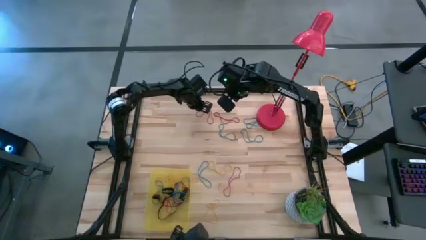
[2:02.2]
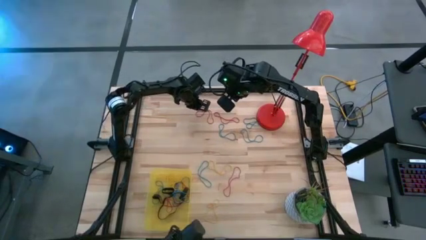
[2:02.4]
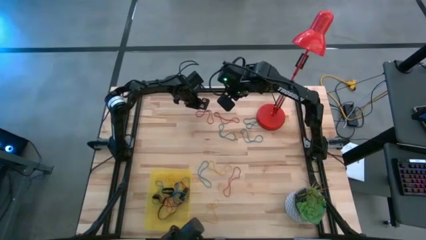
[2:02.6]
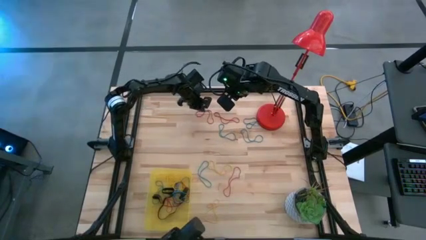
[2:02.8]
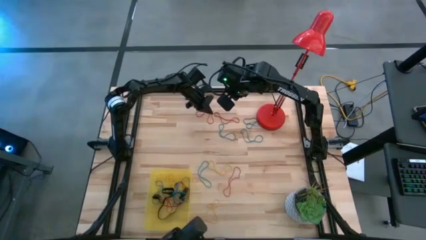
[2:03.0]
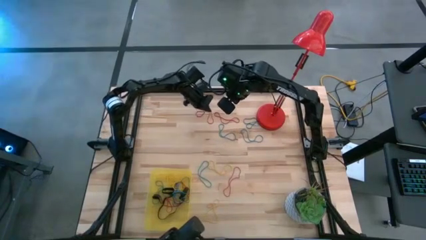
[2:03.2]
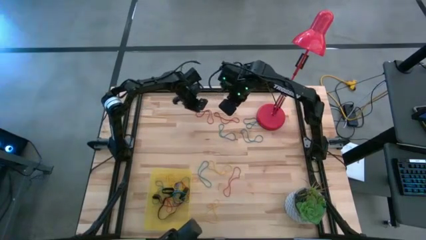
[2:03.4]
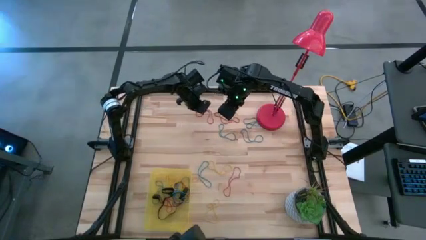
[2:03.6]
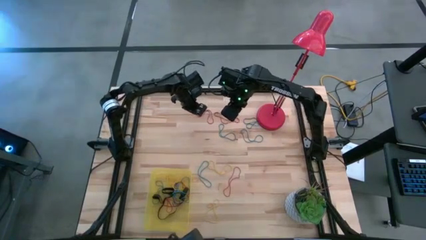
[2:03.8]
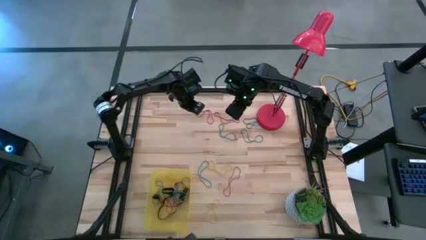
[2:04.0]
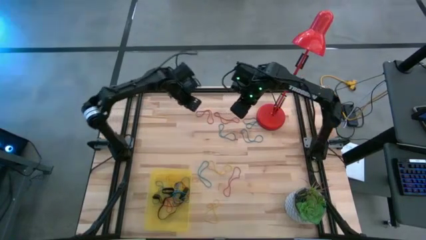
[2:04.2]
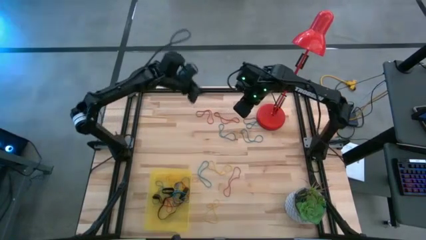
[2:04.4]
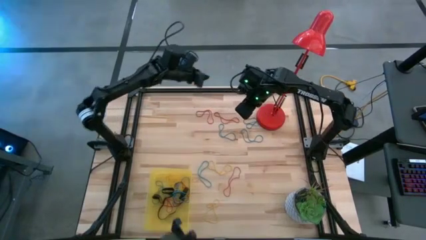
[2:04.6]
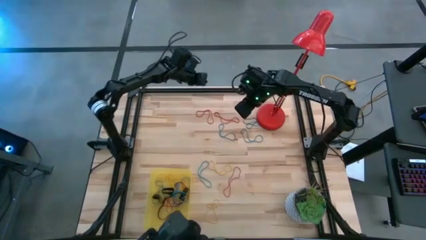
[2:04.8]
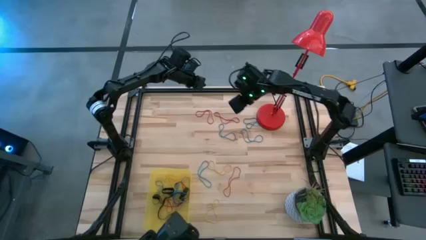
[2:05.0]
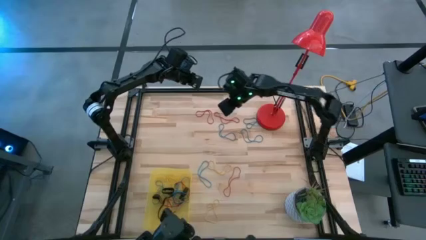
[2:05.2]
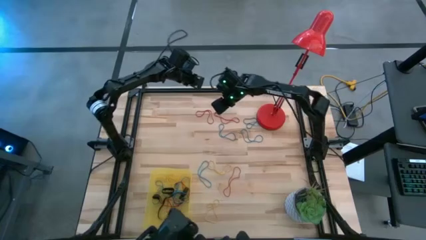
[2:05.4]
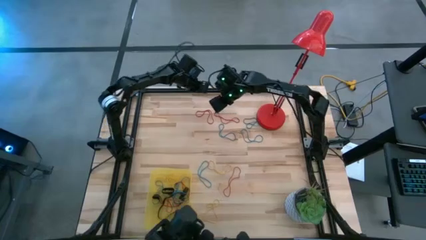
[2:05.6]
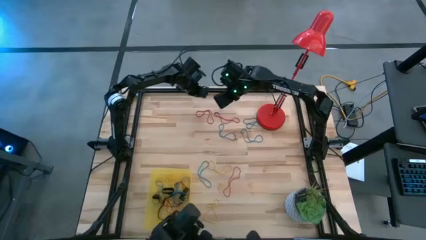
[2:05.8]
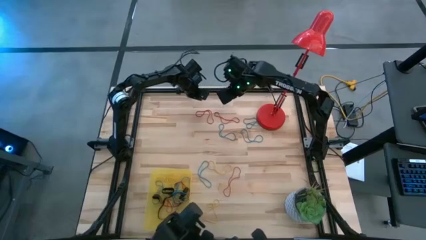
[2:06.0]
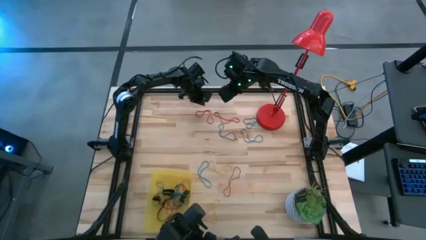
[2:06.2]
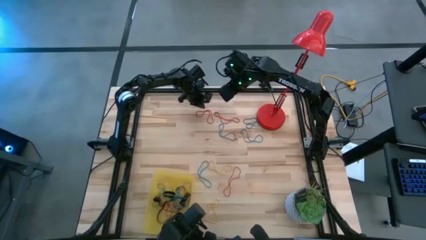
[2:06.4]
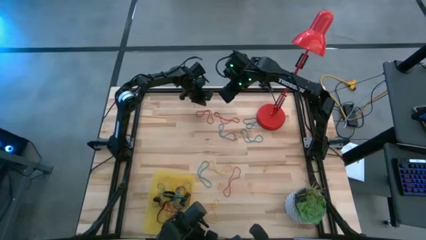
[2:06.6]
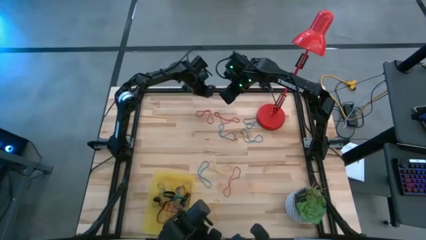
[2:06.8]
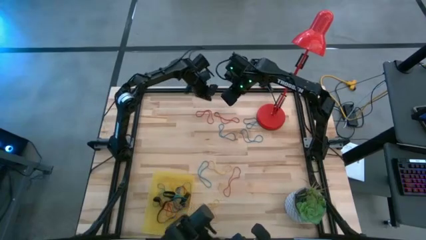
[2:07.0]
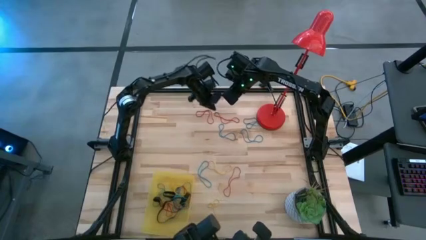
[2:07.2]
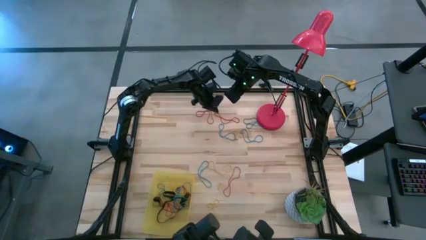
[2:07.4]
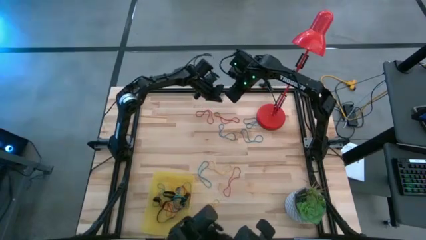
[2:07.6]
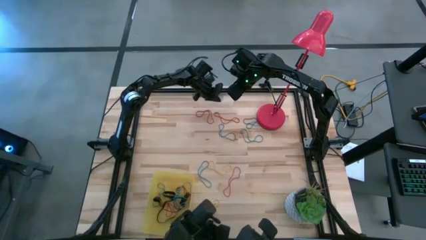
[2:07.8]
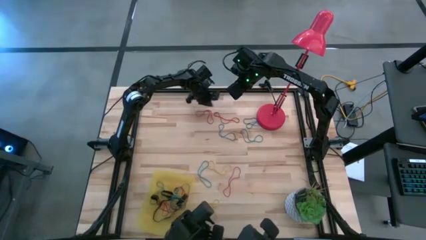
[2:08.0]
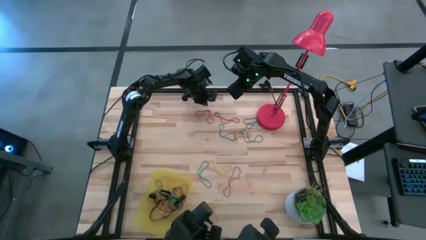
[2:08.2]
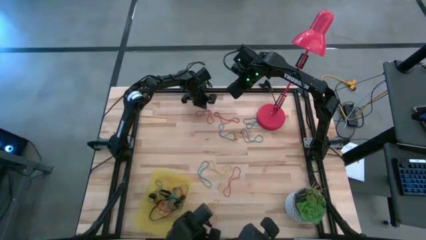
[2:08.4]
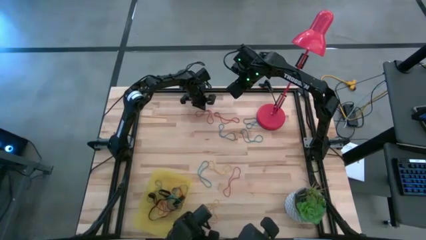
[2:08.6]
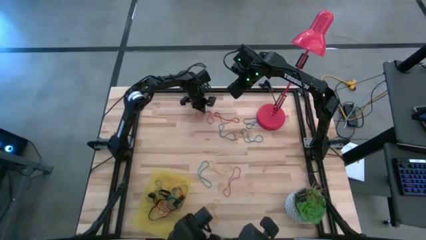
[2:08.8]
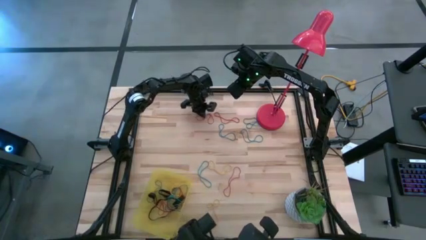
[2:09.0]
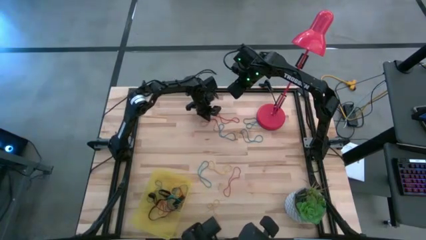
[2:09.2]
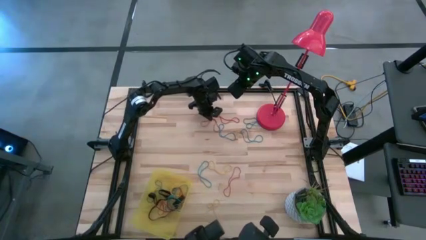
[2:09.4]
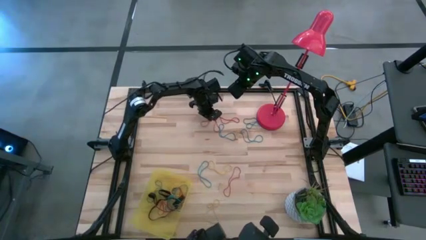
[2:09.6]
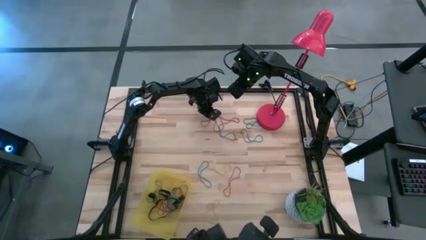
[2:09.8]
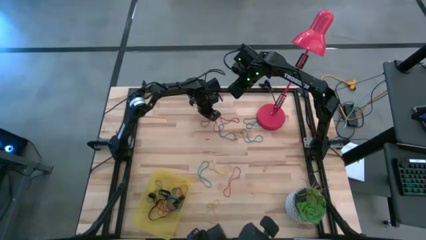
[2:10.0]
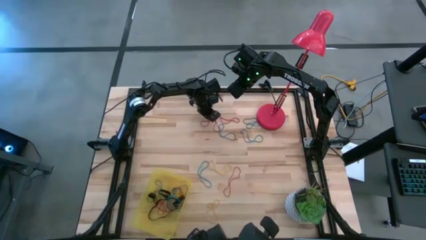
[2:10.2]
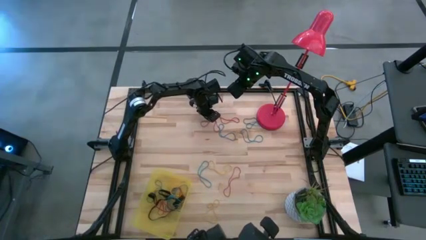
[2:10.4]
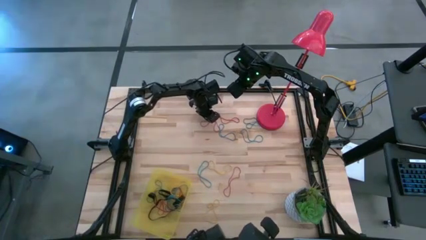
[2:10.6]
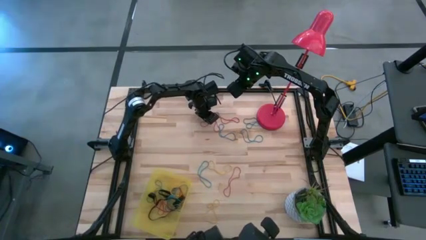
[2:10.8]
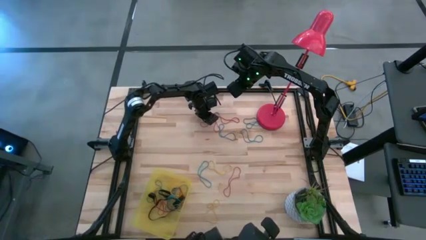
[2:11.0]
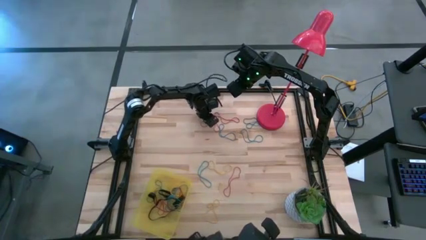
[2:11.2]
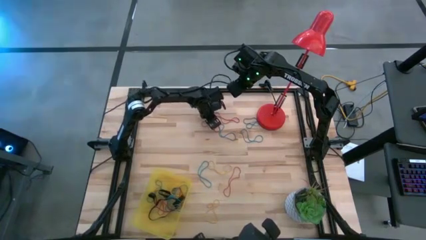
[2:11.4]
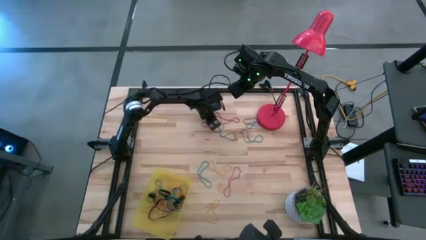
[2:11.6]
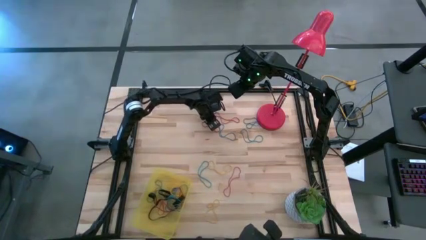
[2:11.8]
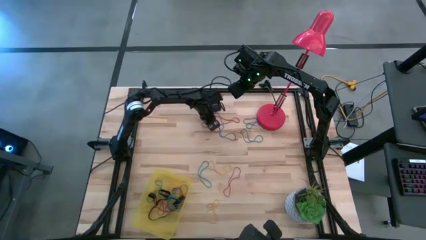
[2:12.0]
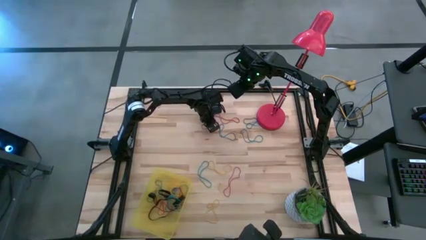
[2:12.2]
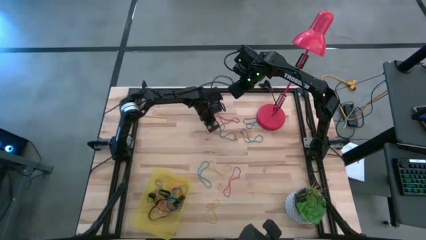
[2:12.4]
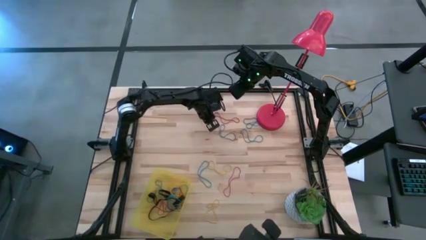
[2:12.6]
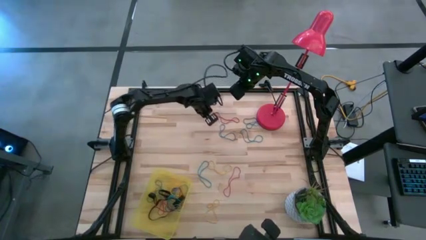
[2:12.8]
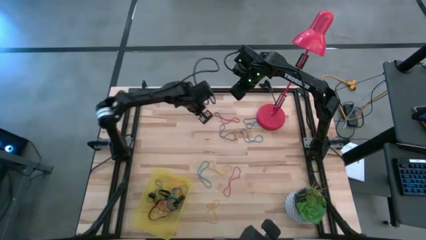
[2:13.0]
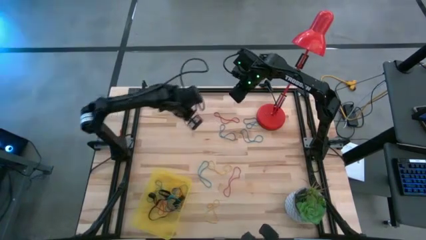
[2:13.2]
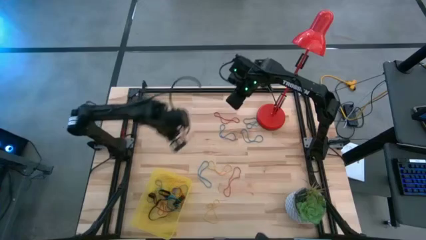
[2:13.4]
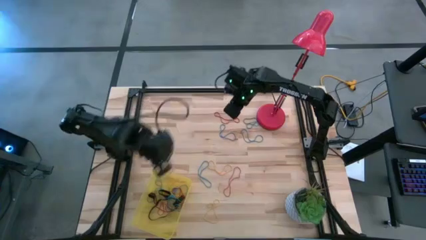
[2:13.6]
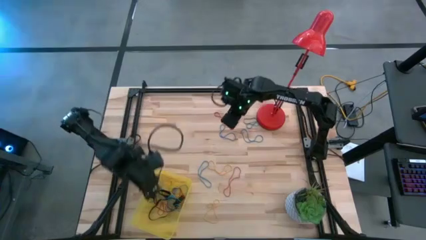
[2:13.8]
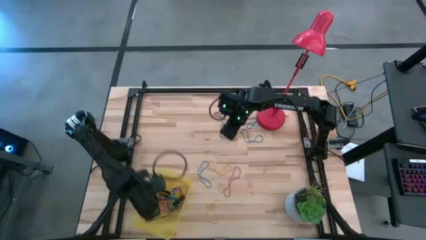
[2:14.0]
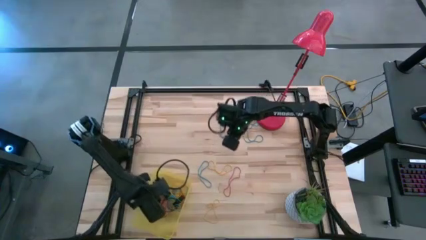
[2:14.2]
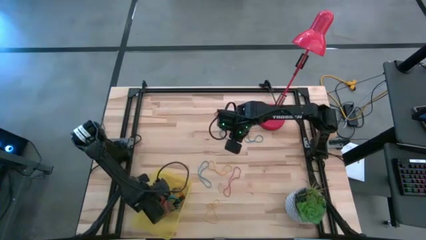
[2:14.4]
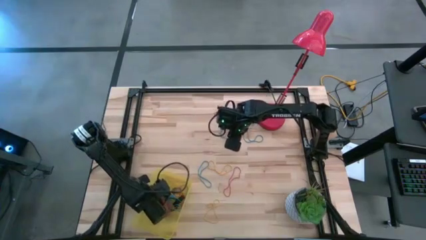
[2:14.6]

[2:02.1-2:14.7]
Task: Pick and place rubber bands into bin
Put the red rubber band into the bin

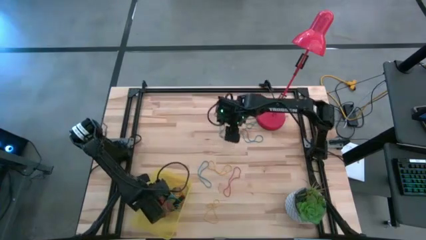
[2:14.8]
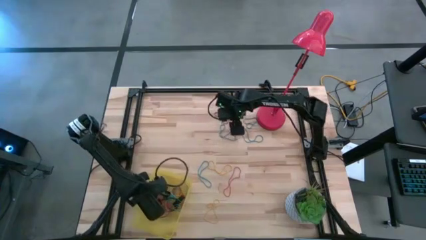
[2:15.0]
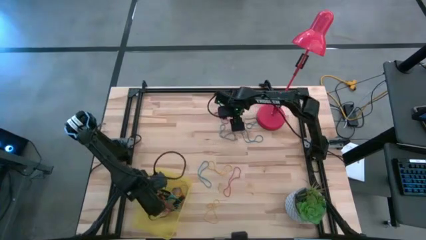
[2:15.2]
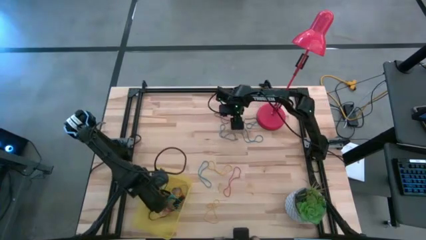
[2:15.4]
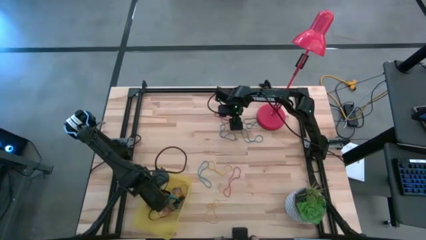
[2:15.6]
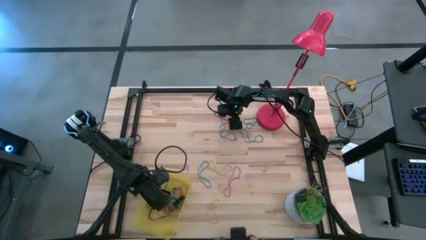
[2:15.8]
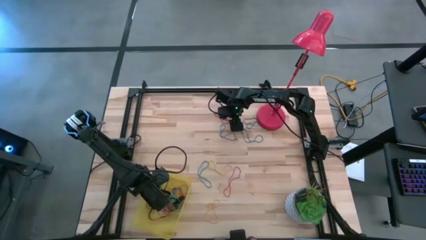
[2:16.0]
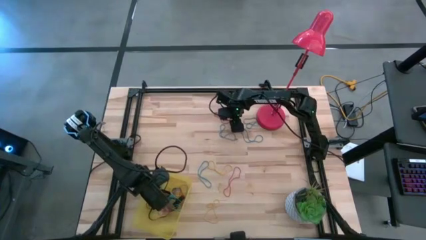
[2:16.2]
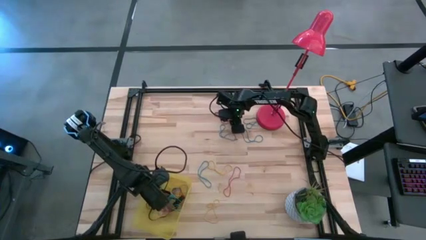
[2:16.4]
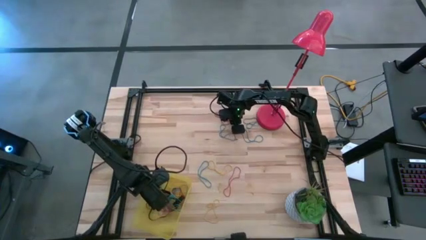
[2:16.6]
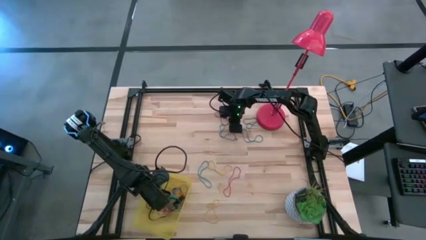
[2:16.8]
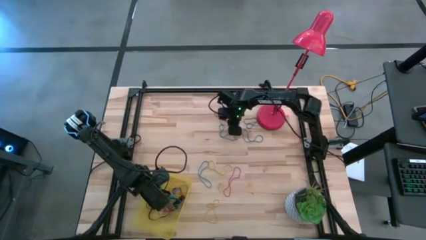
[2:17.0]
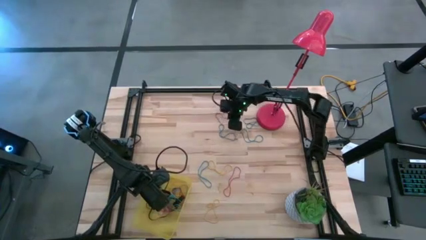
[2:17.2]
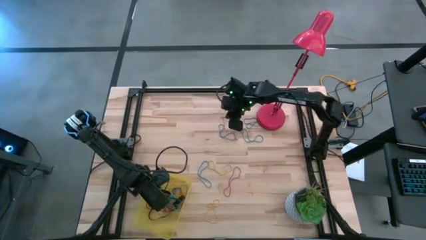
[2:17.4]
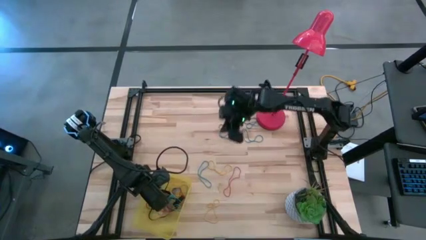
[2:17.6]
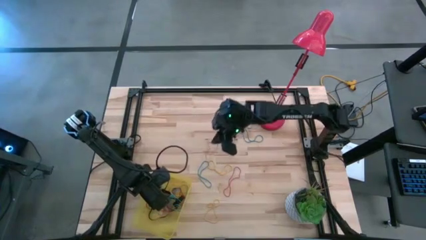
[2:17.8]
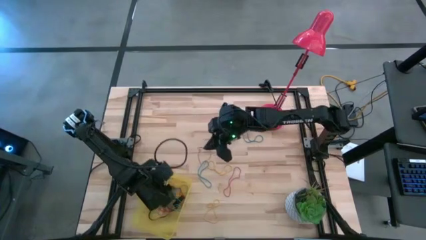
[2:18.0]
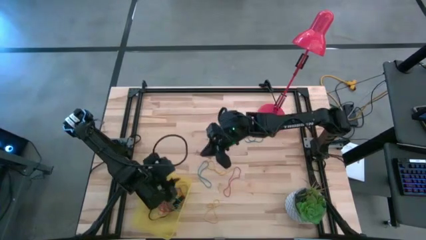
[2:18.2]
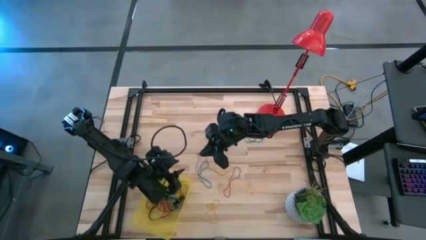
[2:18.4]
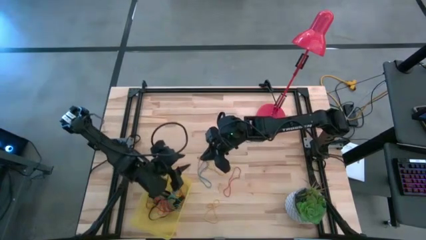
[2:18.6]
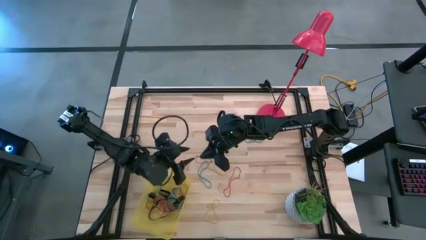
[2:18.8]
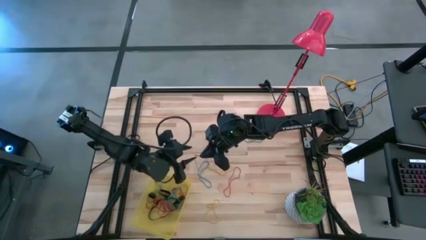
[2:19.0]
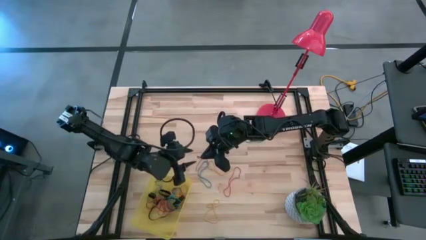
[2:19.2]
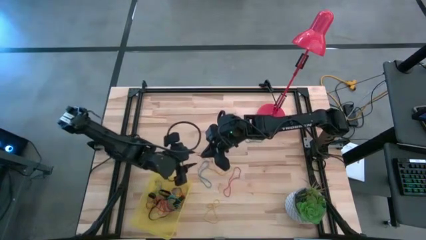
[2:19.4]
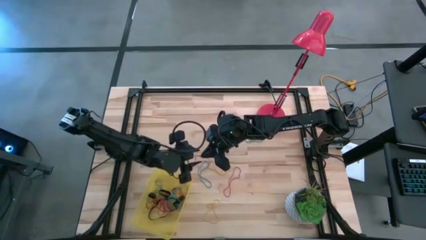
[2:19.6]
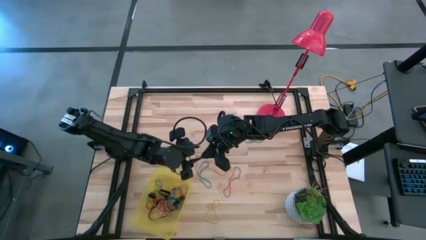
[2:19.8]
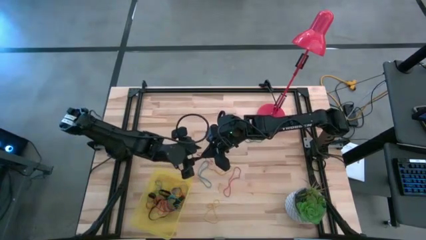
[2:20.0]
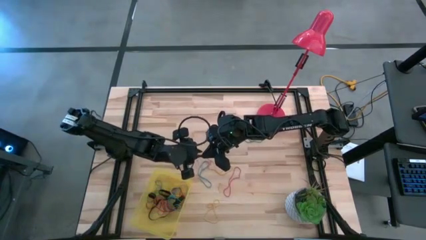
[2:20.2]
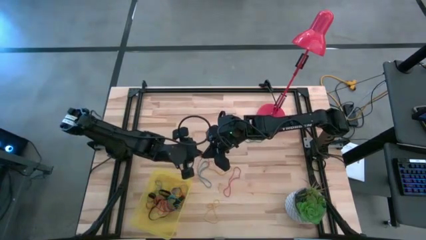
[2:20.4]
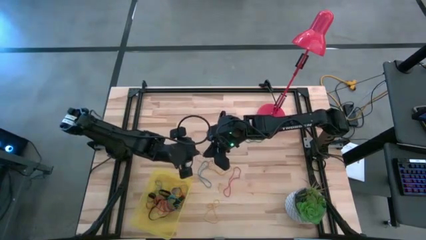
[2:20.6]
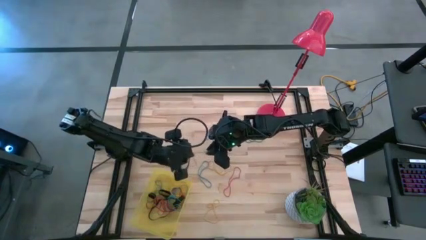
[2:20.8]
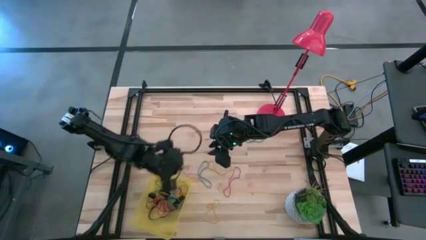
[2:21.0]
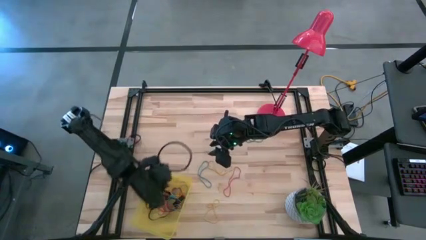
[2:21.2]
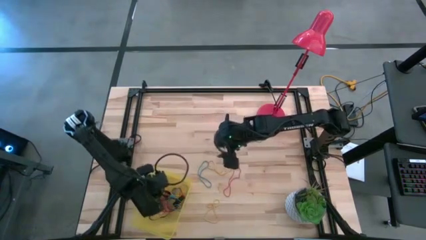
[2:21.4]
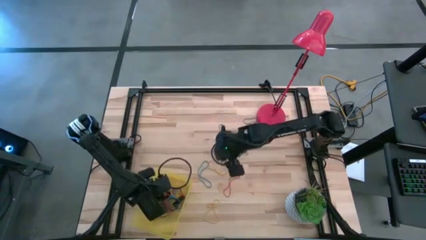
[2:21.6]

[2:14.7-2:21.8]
Put the red rubber band into the bin
